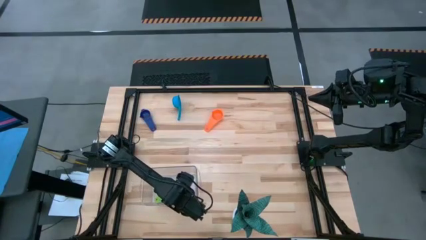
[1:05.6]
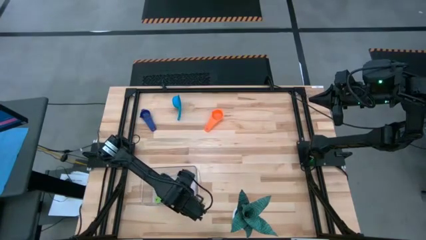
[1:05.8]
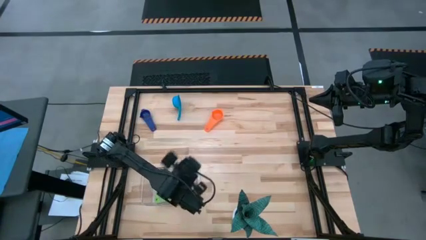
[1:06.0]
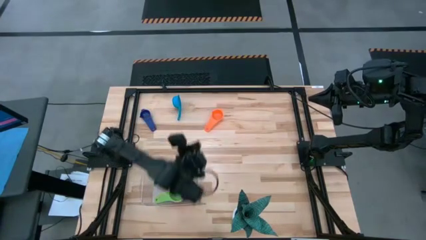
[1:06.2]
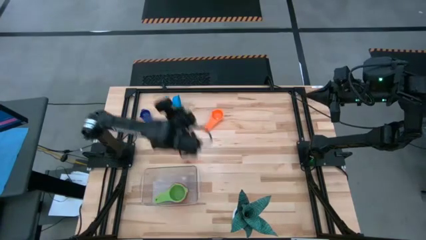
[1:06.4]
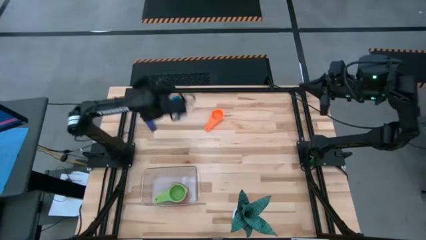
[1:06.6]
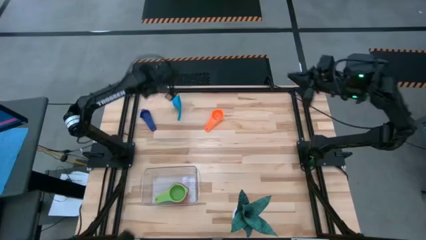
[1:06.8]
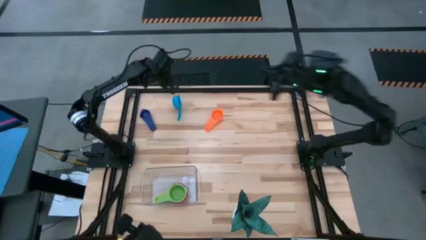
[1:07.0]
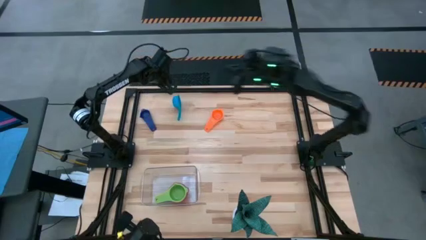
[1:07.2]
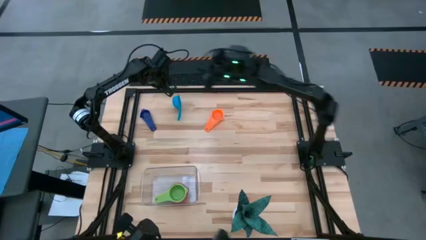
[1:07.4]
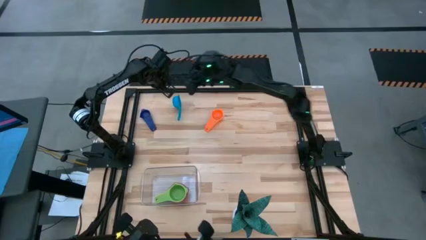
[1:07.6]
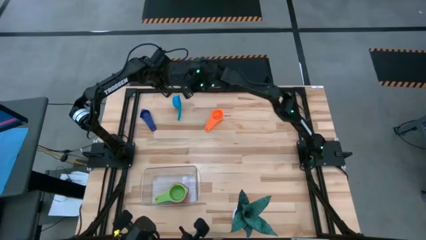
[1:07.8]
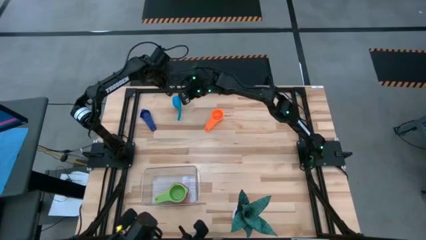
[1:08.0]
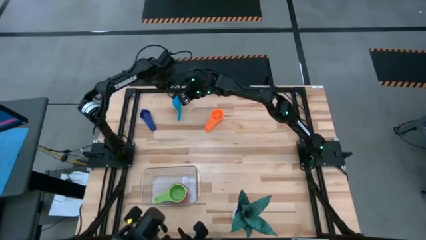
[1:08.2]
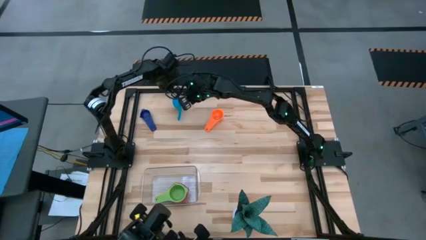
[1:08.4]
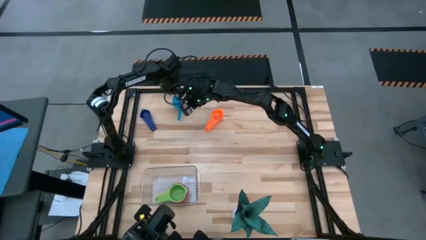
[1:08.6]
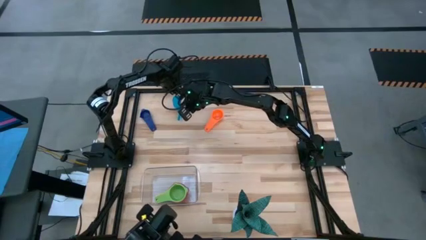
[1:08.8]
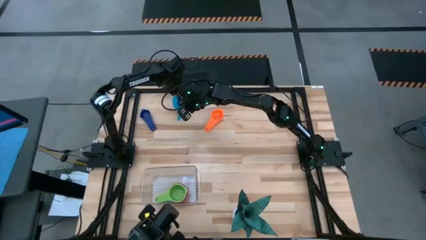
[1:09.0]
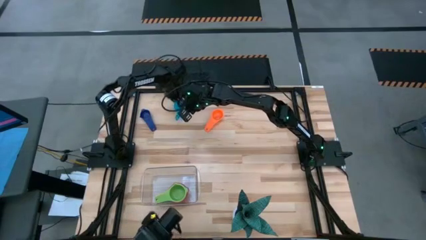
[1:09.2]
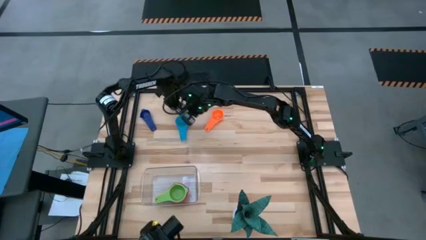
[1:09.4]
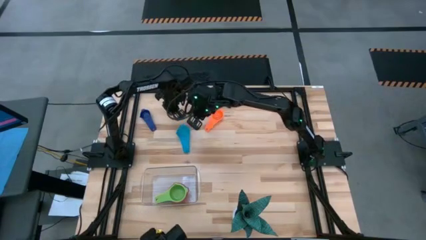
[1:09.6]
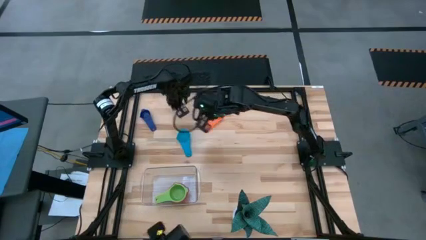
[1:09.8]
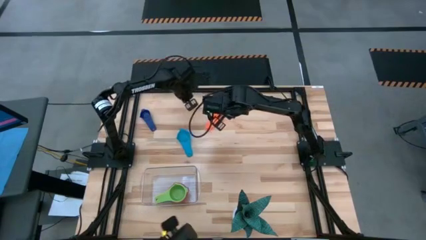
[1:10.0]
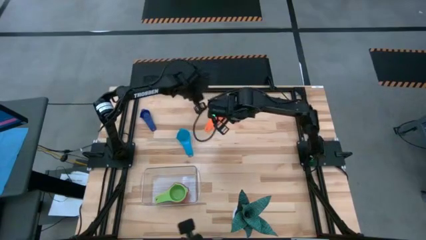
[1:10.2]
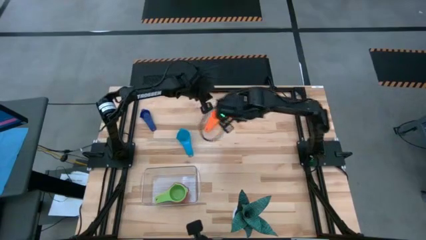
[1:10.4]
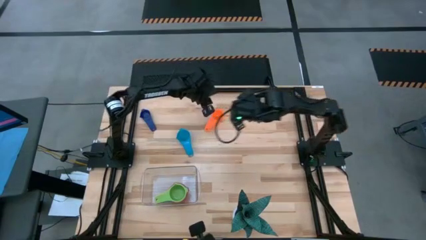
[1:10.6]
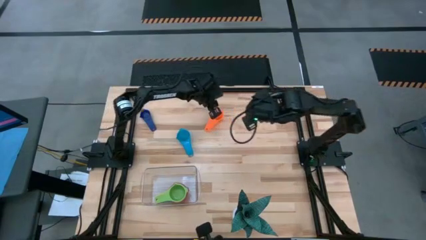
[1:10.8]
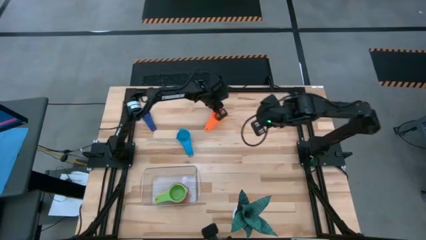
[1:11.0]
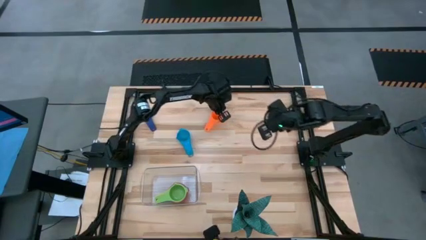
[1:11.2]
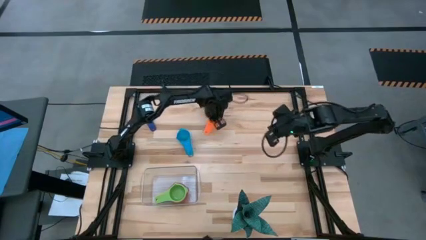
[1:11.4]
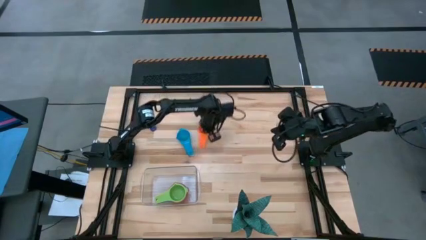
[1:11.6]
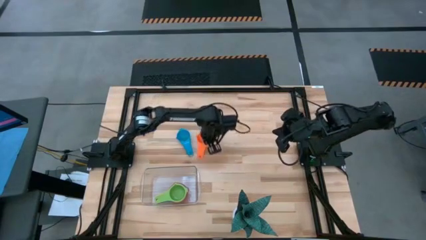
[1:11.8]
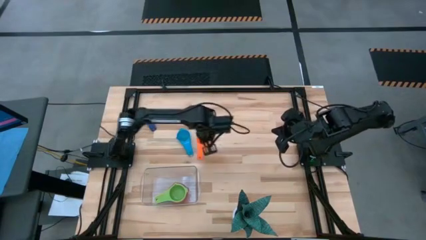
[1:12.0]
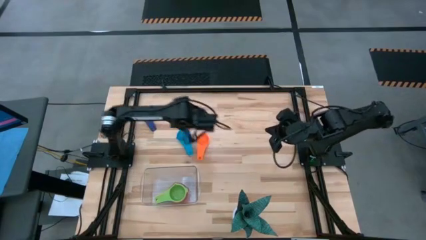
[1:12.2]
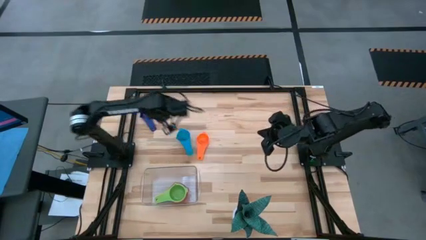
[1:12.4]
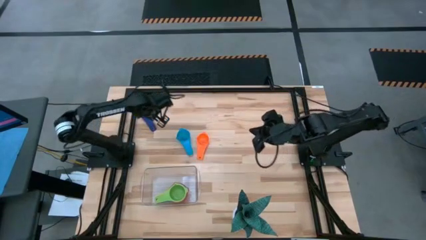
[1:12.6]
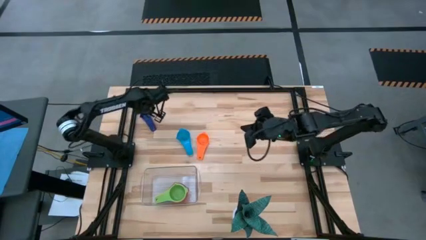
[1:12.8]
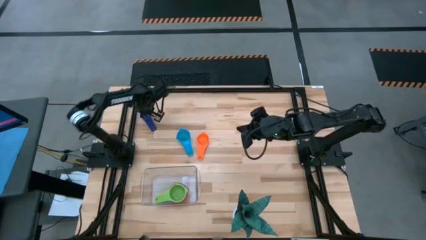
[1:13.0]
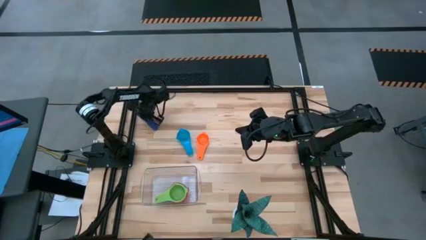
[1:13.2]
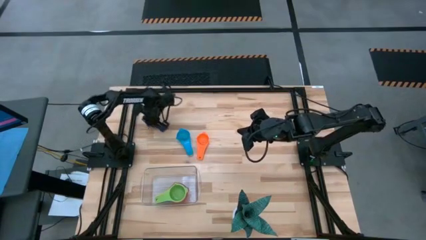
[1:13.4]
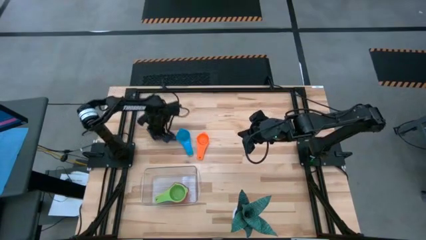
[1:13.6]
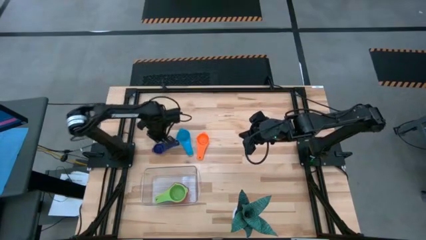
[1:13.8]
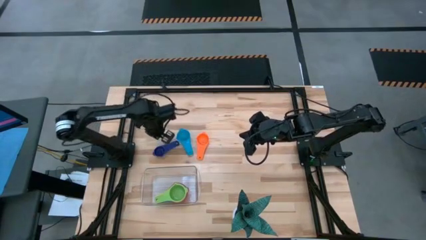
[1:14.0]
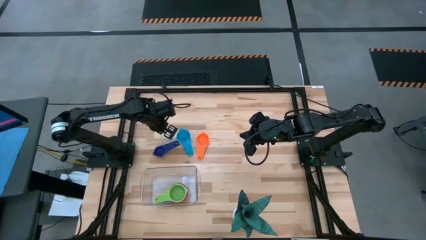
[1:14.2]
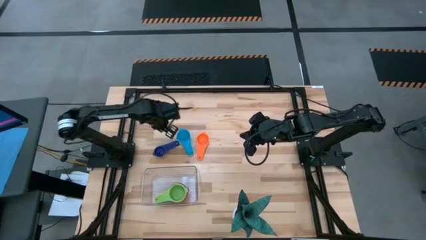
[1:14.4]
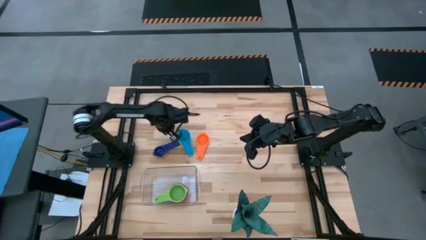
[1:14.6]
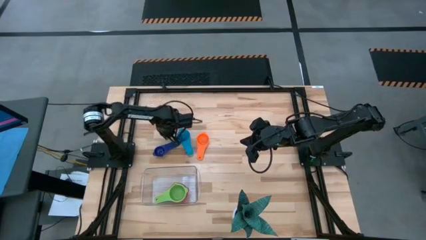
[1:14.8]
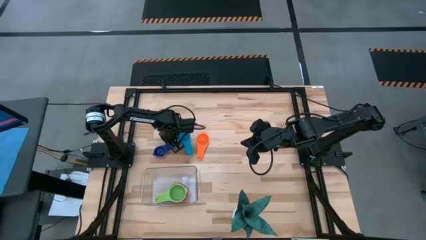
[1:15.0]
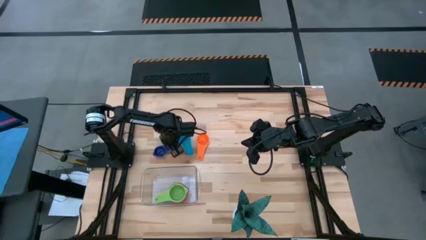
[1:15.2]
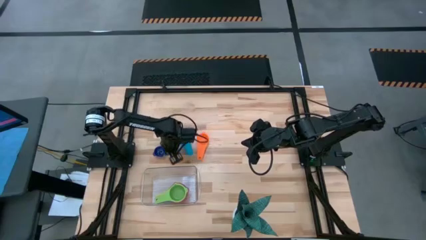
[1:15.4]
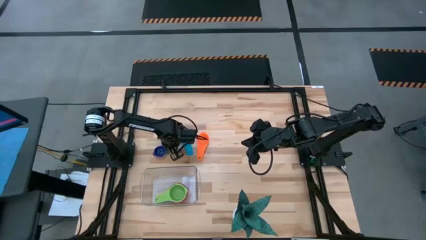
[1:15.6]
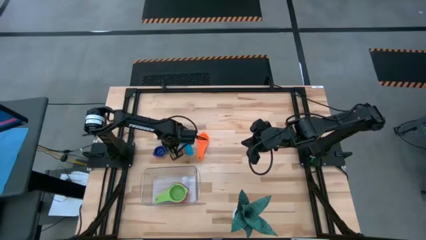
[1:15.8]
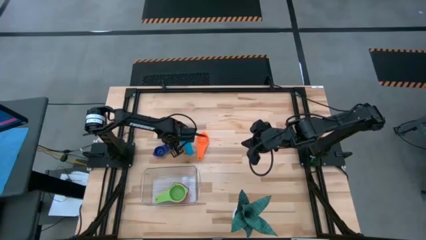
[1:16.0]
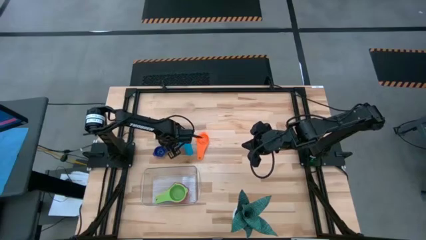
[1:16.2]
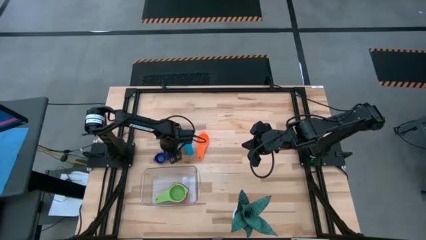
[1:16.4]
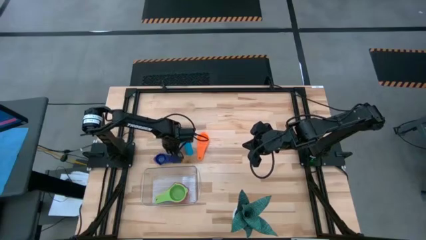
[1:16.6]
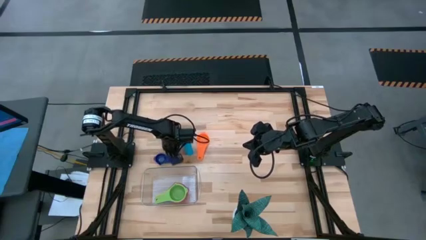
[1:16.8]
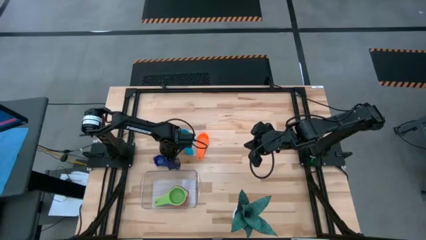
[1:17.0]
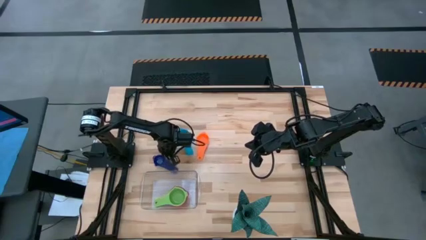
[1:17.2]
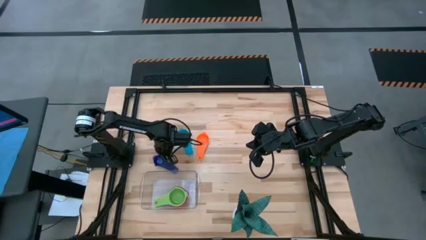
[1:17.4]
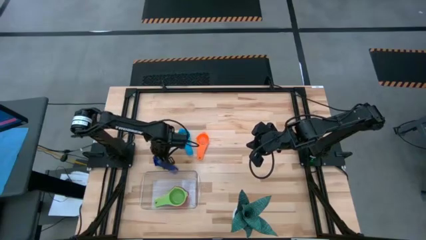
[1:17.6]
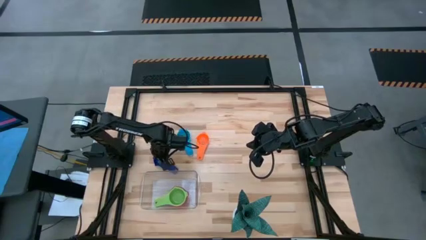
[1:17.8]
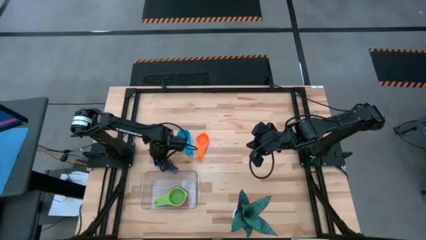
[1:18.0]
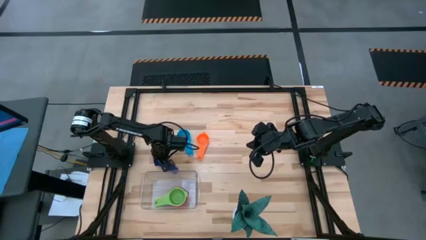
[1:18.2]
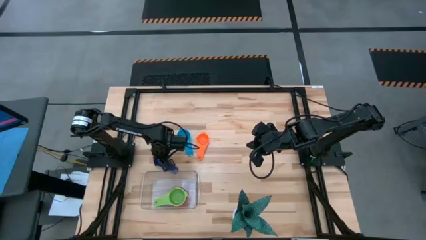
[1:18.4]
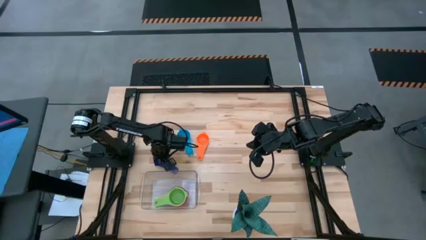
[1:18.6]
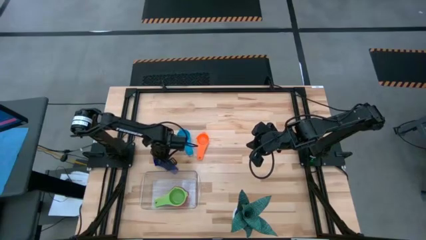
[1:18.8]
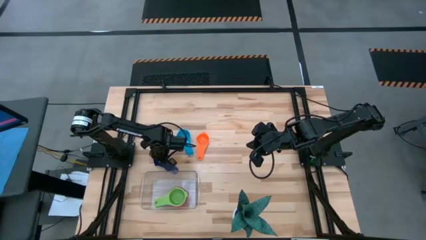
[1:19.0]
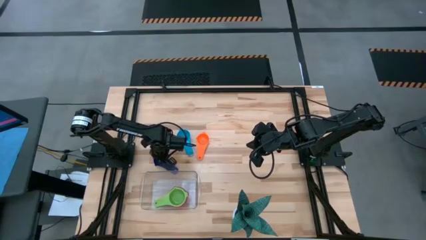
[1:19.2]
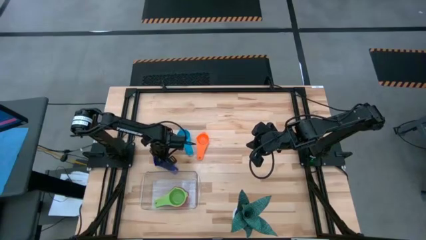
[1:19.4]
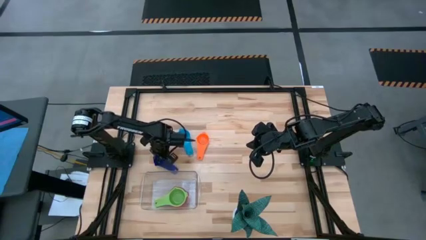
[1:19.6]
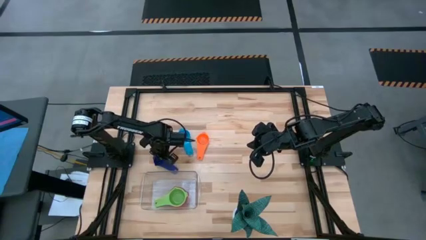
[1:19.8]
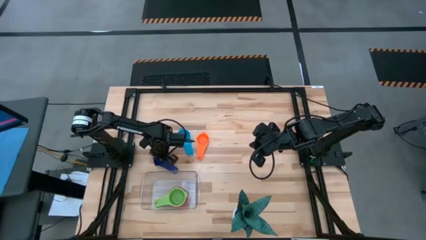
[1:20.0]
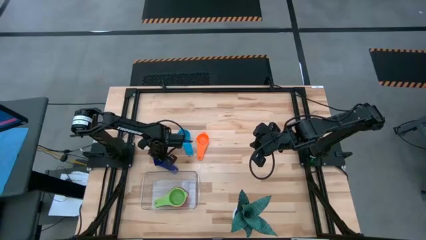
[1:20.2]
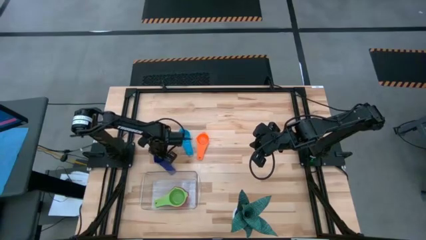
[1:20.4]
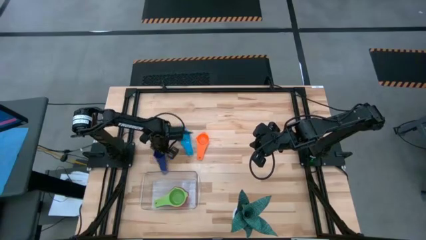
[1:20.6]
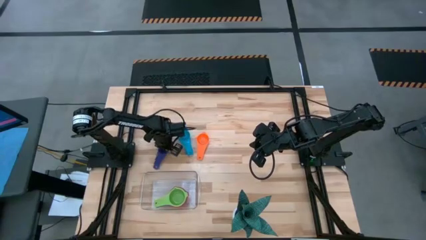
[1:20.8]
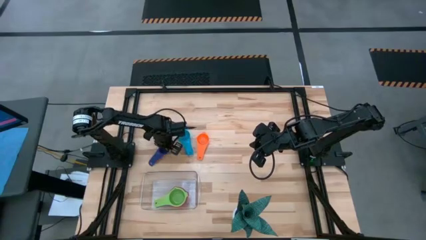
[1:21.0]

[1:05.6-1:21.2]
Task: Nest measuring cups in basket
Adjust the measuring cups

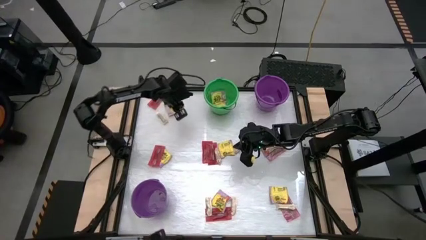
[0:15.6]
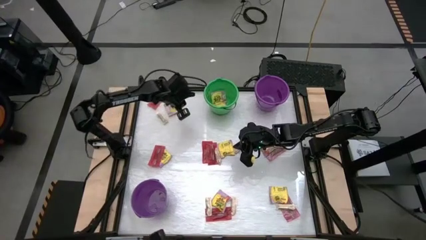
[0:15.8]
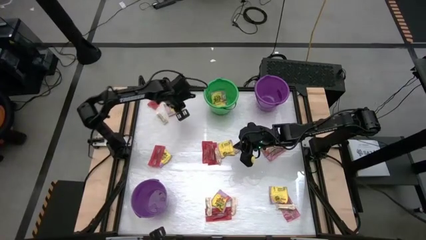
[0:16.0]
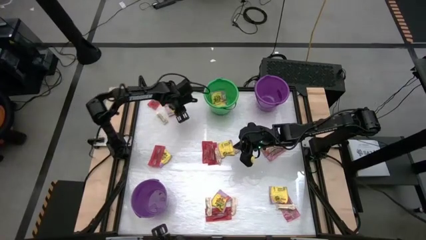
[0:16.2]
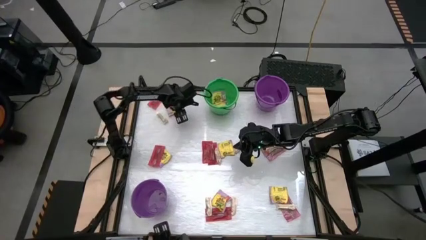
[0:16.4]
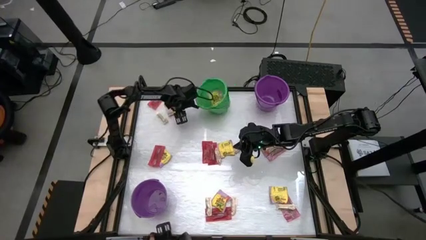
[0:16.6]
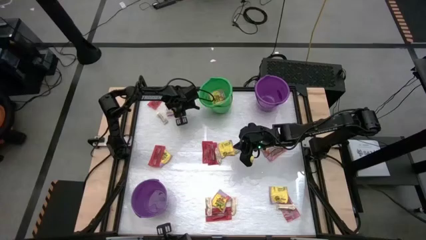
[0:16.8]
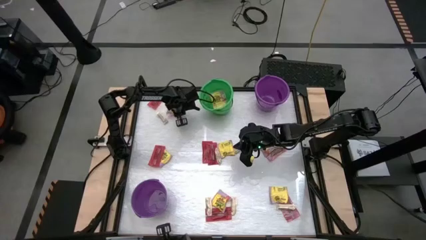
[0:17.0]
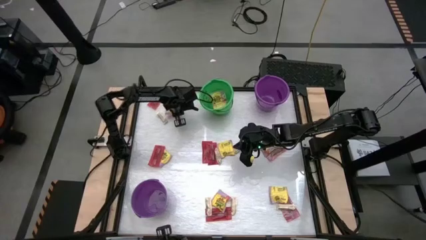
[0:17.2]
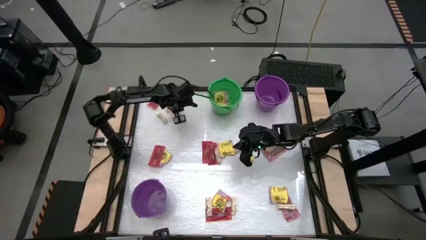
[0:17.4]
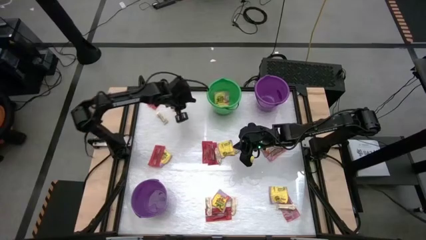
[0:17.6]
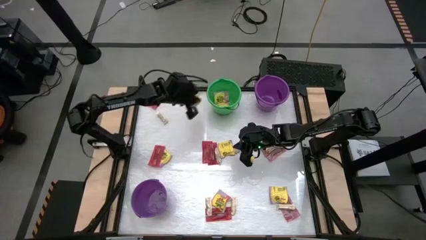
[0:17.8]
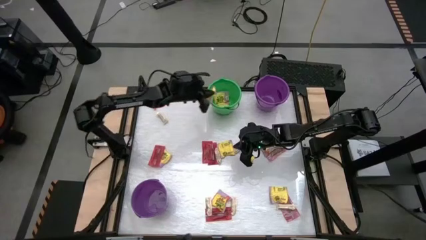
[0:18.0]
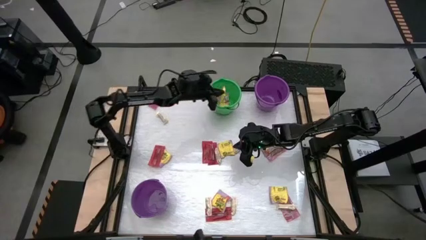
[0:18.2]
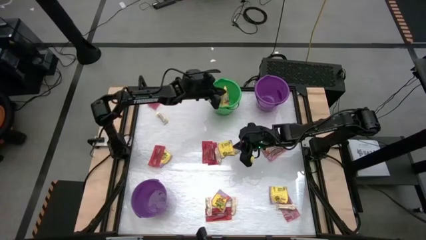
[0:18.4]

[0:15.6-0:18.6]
Task: Sort candy by brand, put in halloween buckets
Put the yellow candy into the green bucket
